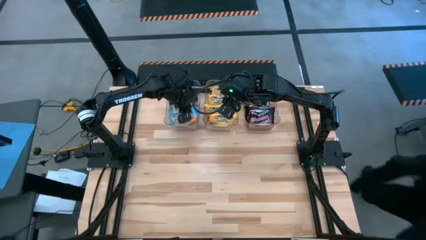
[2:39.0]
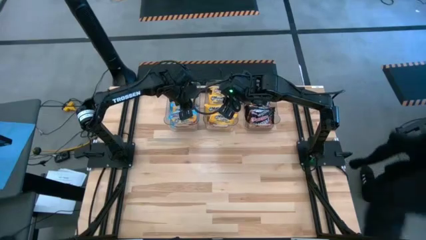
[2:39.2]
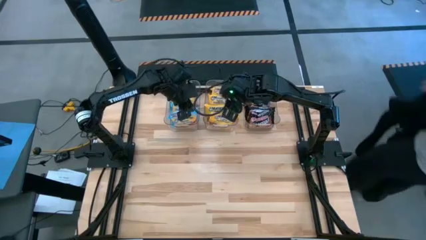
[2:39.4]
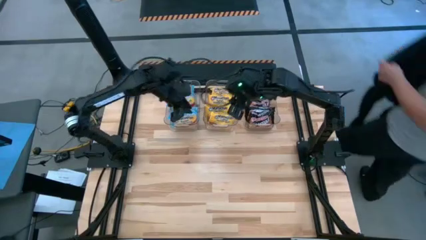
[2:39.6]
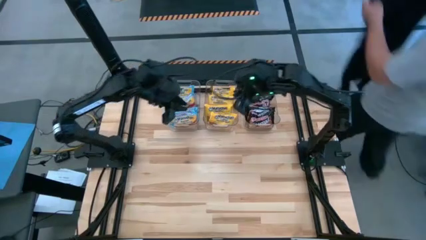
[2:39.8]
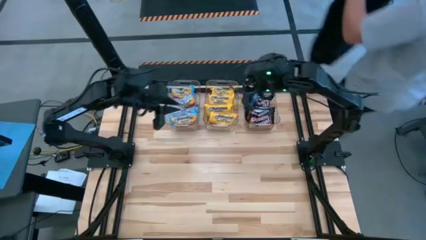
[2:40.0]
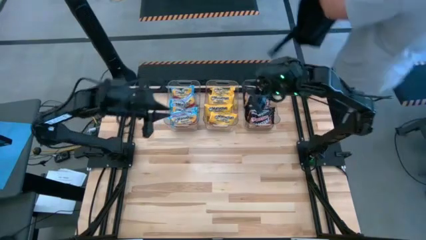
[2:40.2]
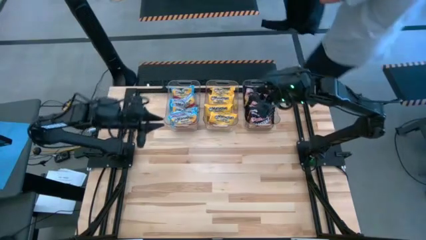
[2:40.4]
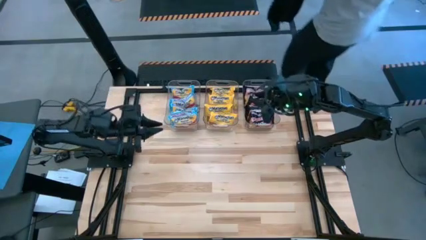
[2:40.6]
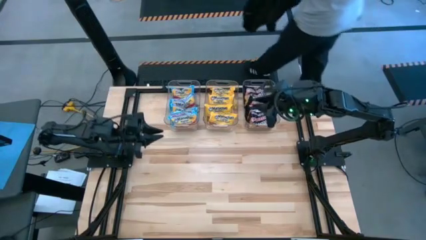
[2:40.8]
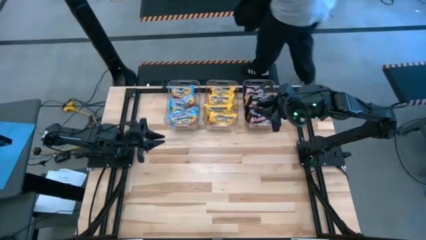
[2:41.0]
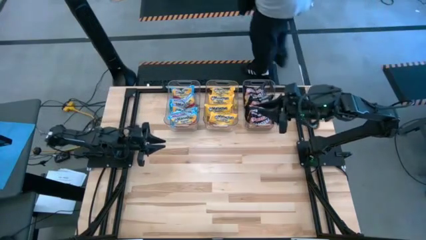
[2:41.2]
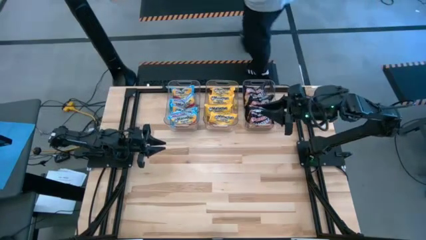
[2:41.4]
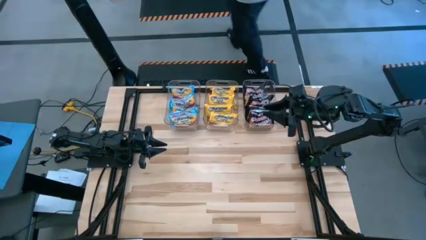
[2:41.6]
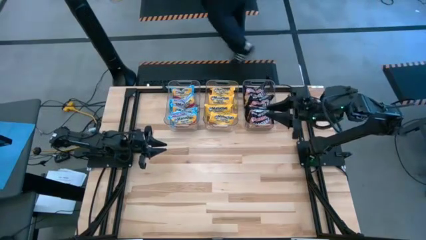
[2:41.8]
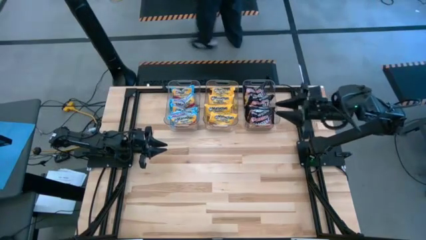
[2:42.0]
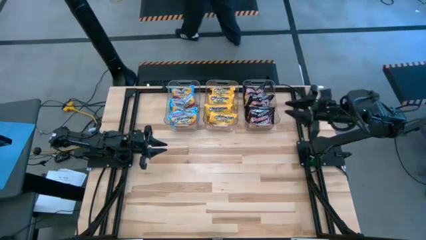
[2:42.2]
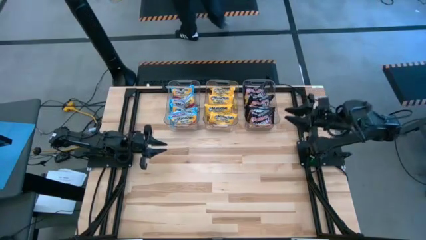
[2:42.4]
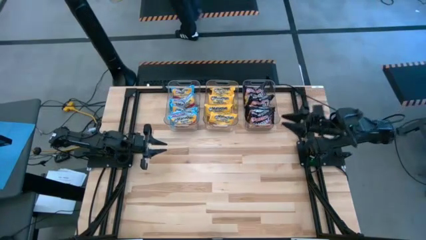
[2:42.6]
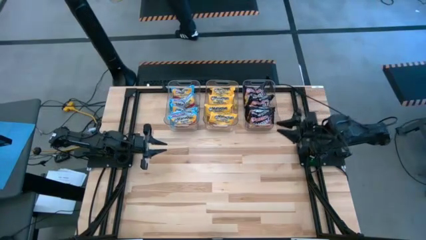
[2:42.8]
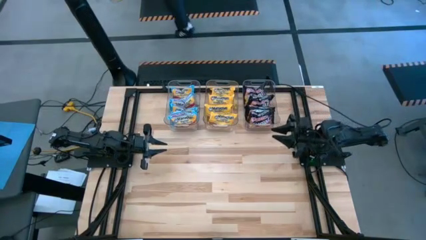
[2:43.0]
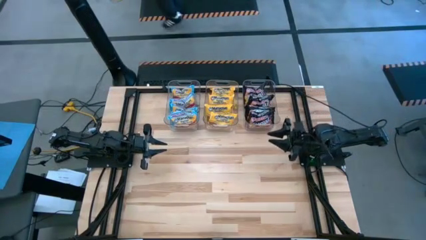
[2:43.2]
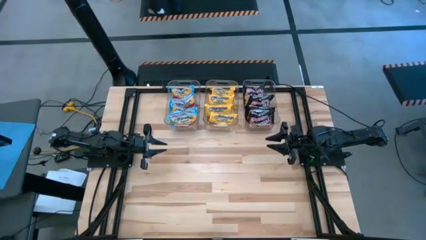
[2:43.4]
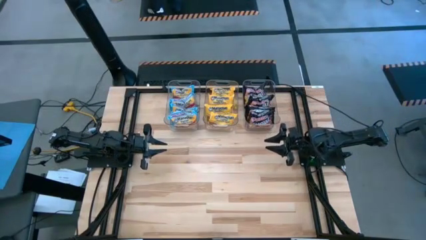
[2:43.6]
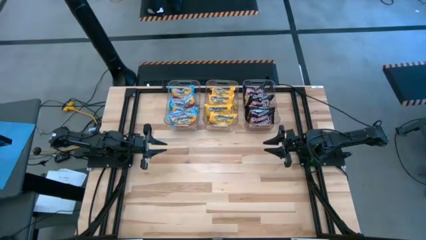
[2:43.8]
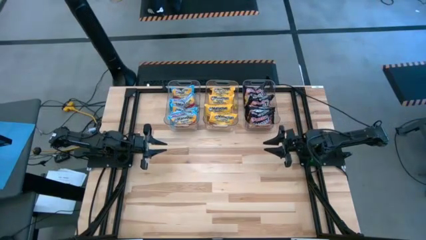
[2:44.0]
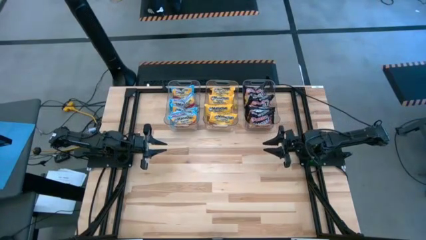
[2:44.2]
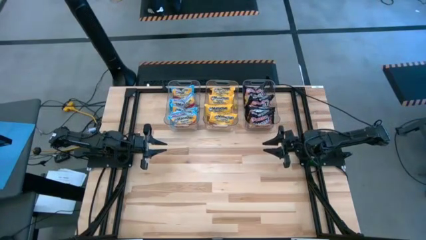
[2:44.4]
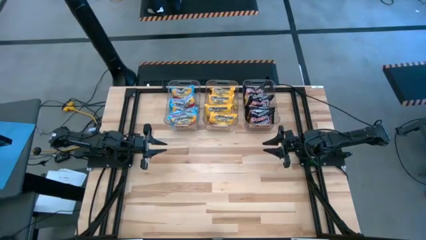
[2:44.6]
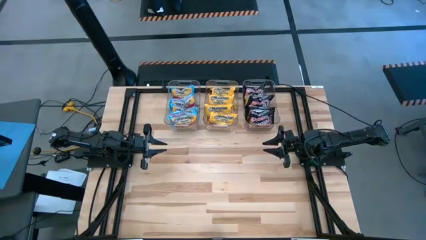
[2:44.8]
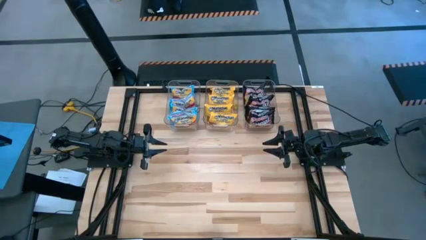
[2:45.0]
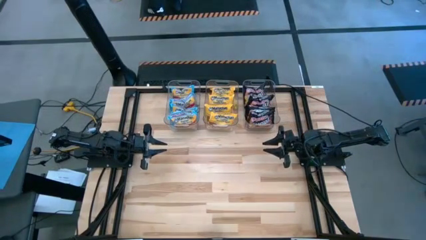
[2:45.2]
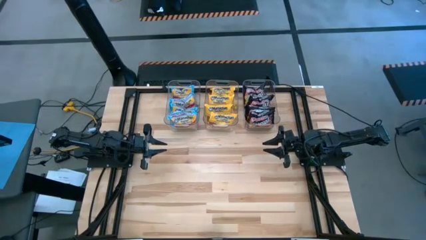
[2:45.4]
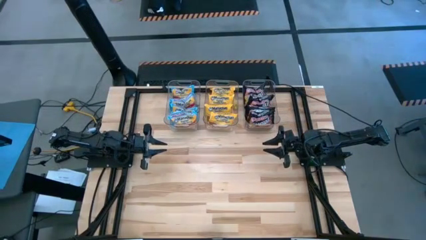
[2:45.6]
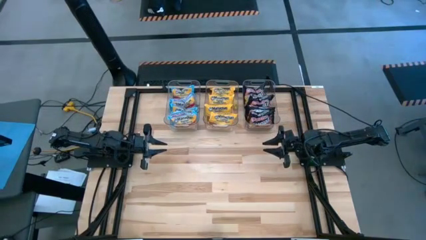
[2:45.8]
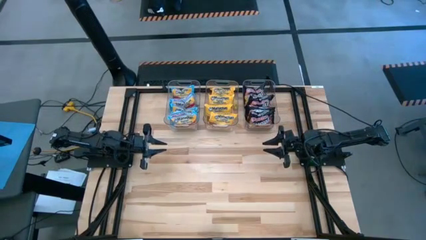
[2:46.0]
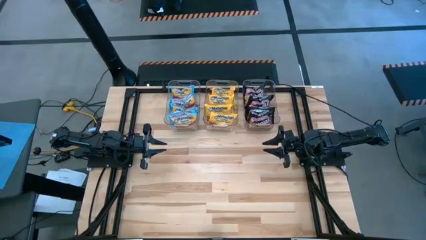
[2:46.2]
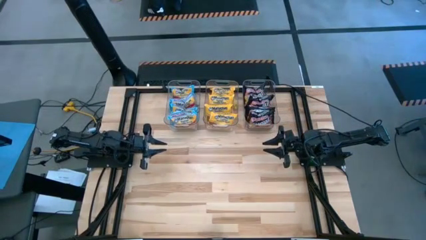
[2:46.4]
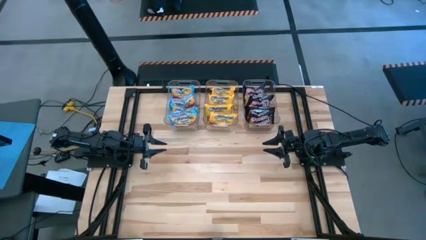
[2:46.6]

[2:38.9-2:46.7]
Task: Sort Maruchan noodles
Return to Home Position

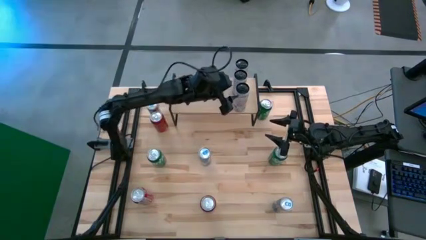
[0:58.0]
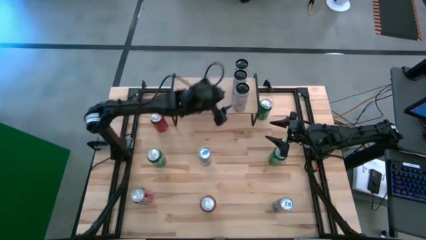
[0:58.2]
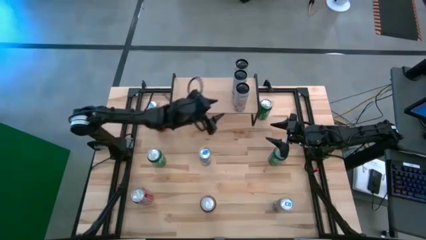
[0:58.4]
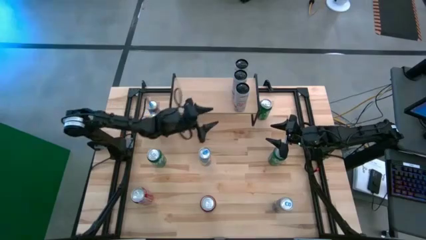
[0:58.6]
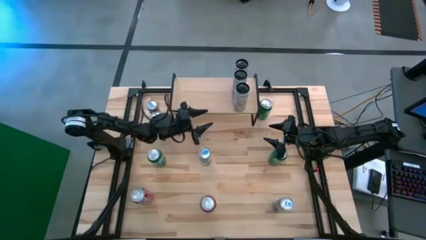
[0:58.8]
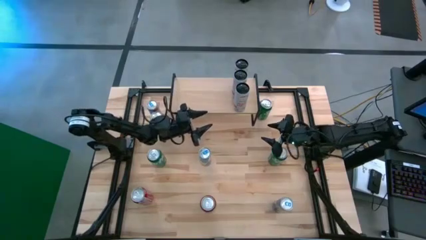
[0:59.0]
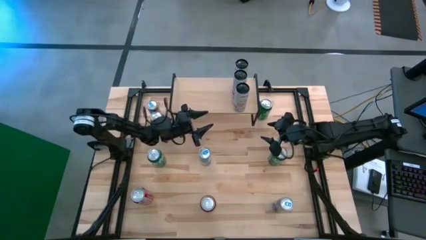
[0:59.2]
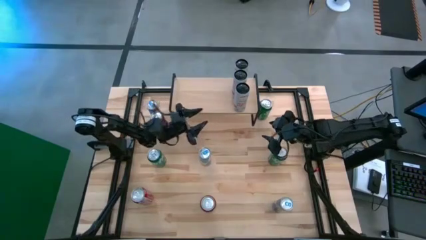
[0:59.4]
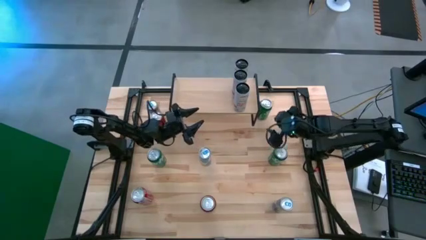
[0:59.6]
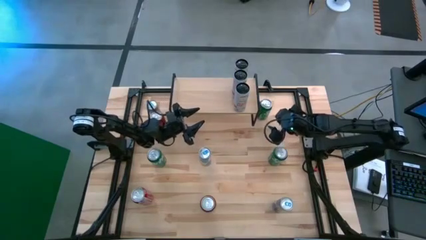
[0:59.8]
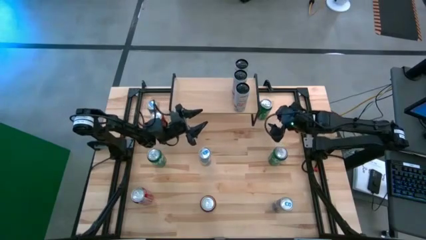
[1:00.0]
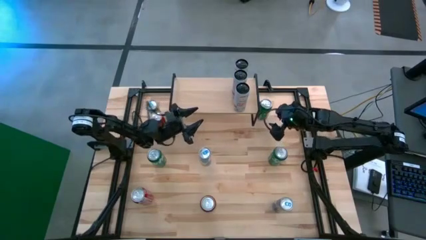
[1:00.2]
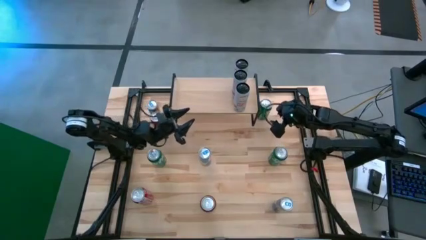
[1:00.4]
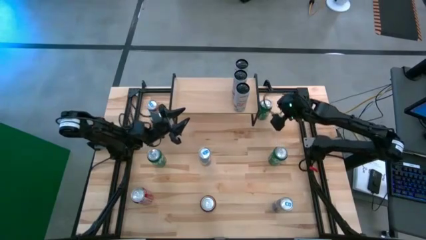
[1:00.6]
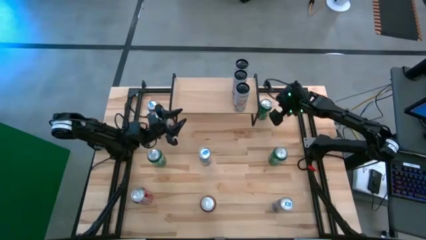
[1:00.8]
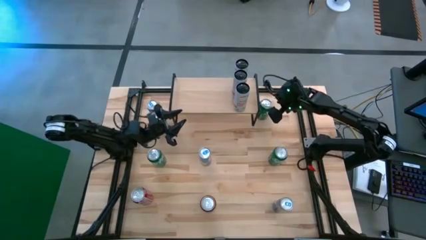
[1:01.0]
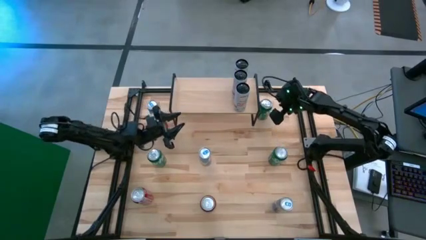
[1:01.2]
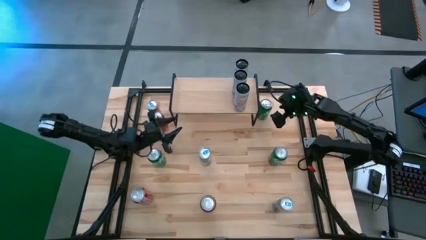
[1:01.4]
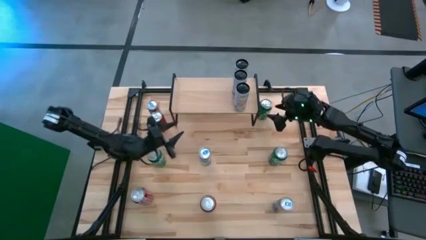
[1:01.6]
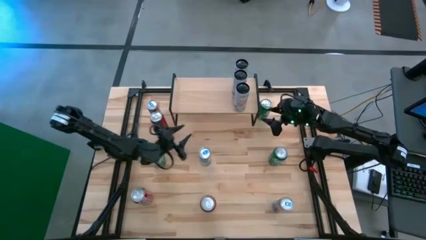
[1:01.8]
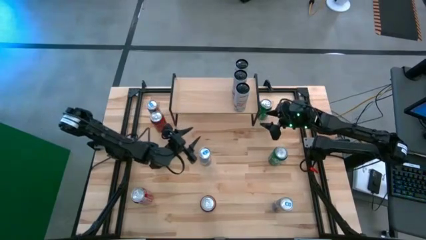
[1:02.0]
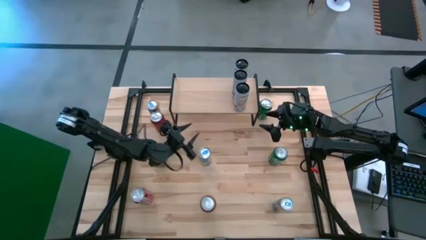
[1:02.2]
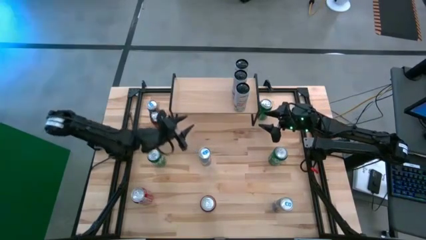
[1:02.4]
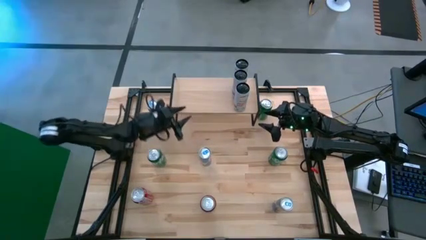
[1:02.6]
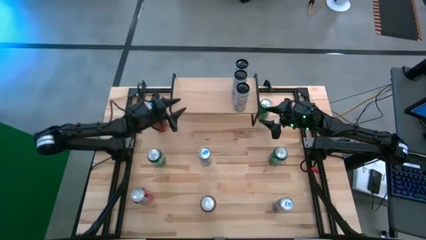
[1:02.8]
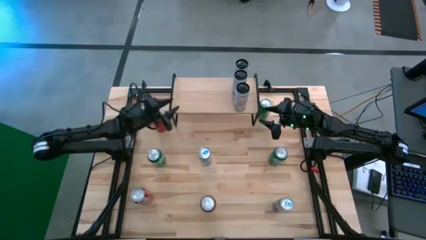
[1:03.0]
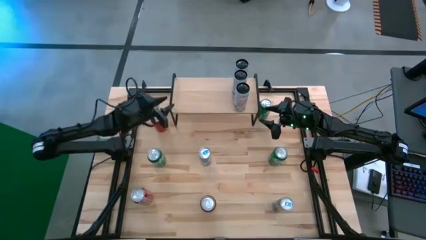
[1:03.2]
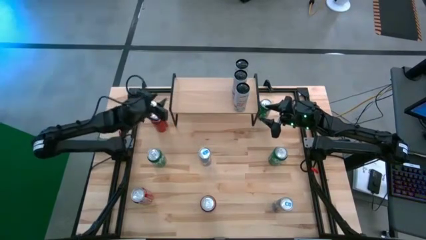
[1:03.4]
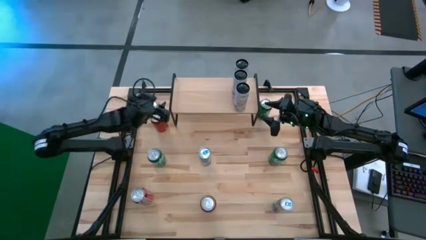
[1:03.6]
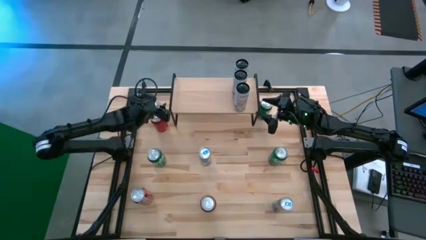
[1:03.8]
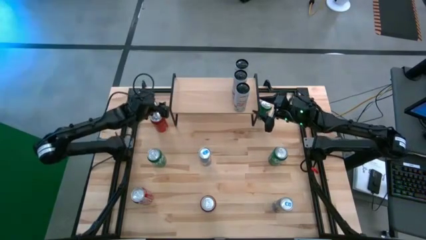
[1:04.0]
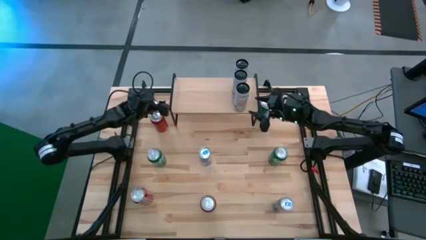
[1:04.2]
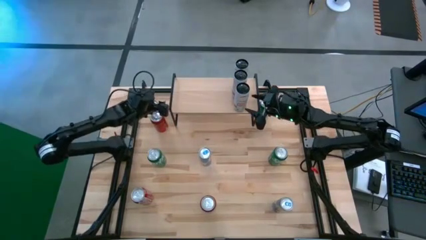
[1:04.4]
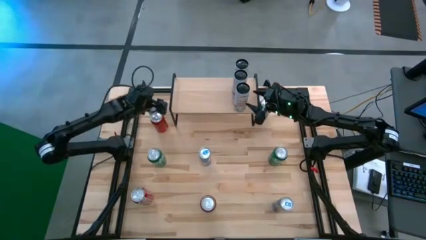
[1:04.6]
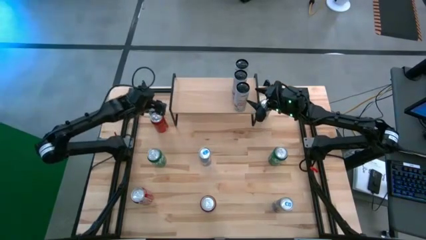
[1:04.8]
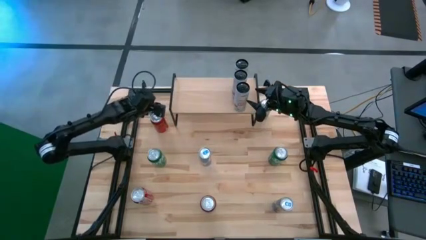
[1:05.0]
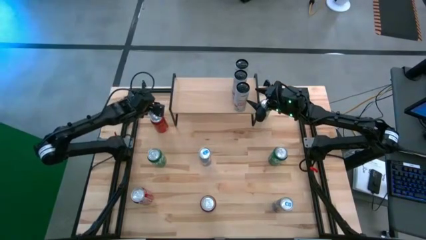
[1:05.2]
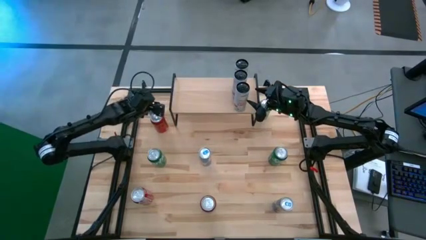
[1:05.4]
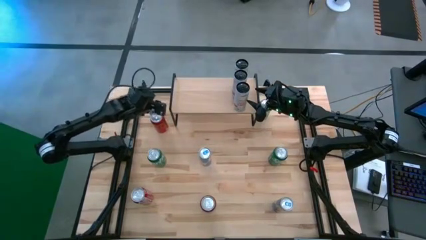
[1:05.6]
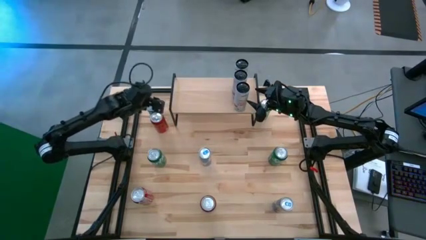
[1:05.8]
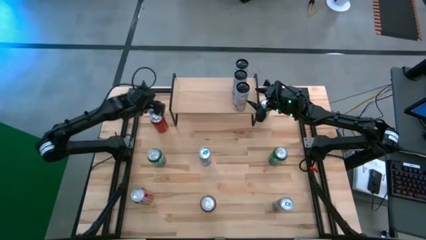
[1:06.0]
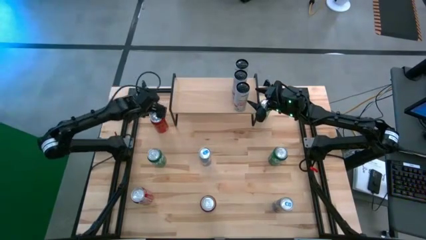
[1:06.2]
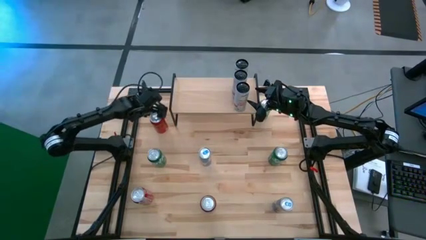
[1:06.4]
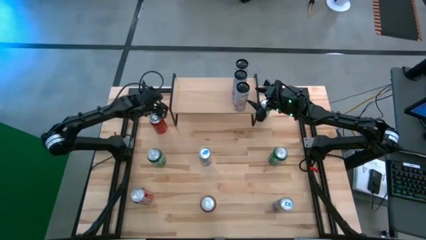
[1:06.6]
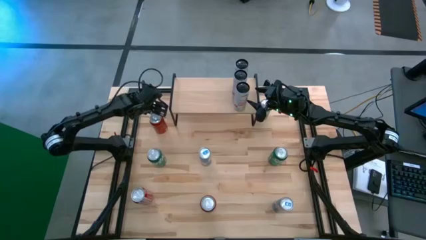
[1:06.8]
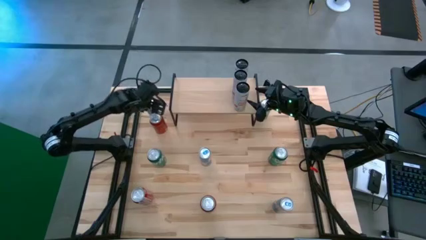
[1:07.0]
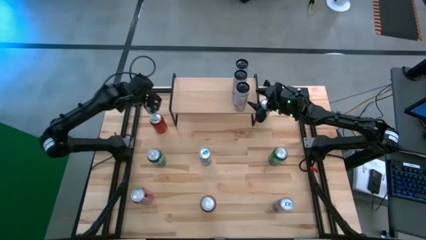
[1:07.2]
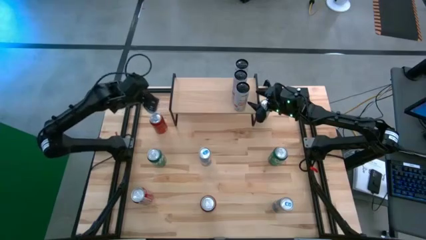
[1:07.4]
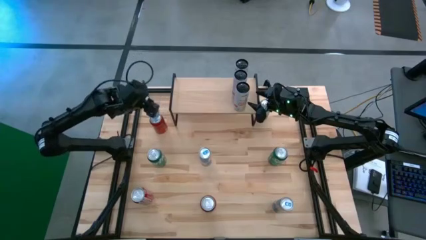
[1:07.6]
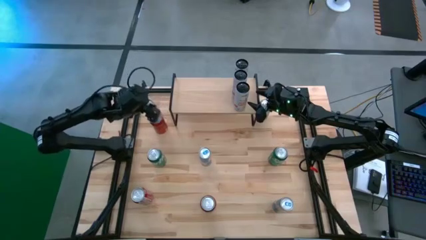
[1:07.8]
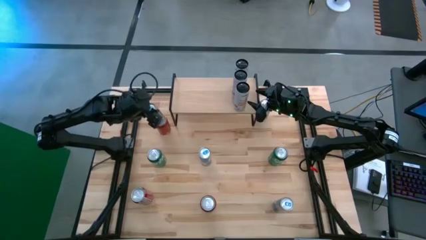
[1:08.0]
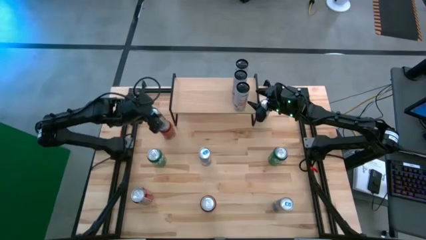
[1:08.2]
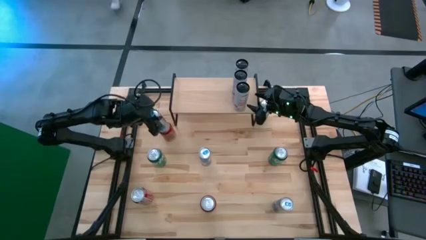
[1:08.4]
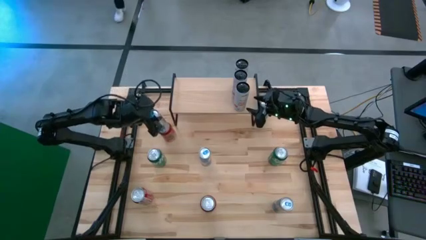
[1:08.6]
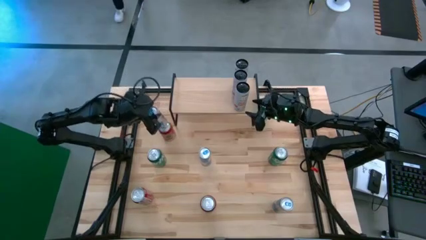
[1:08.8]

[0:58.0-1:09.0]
Task: Place canned beverage on shelf
Put the top blue soda can on the shelf
